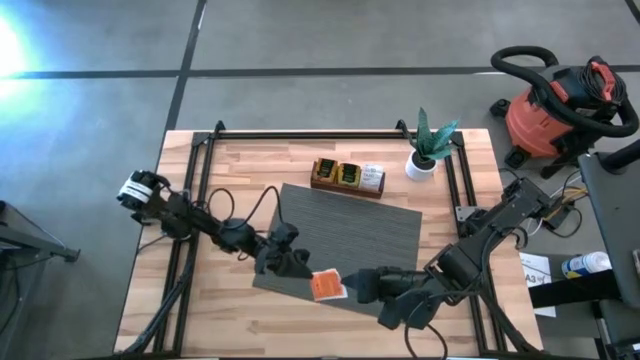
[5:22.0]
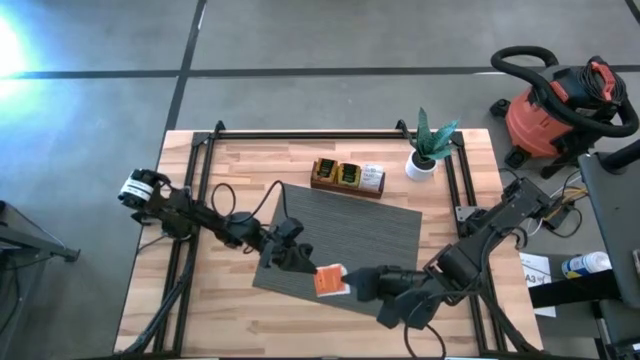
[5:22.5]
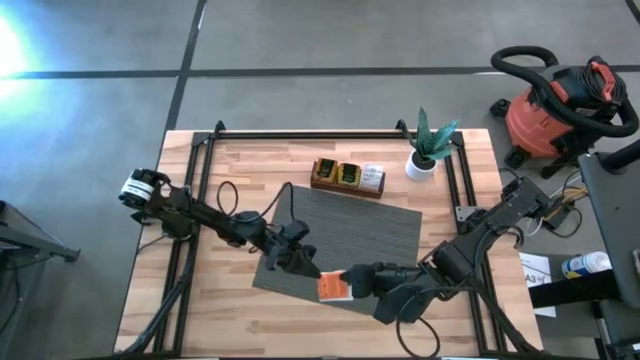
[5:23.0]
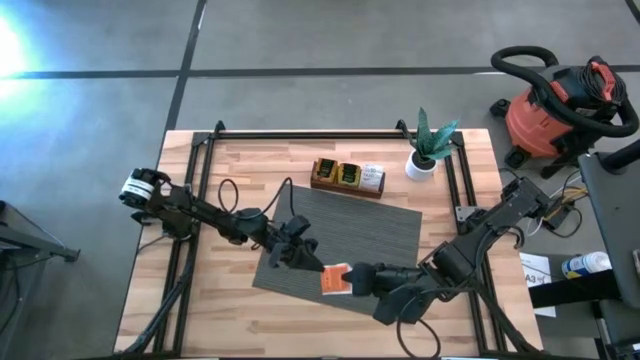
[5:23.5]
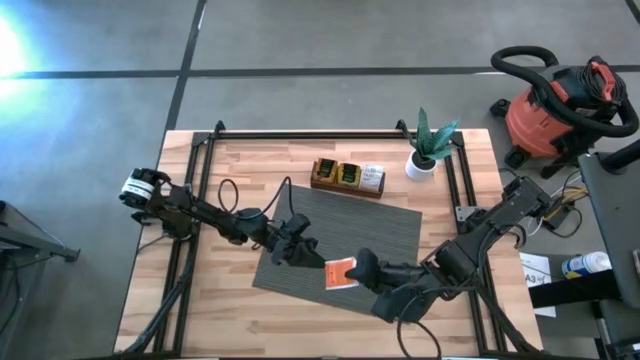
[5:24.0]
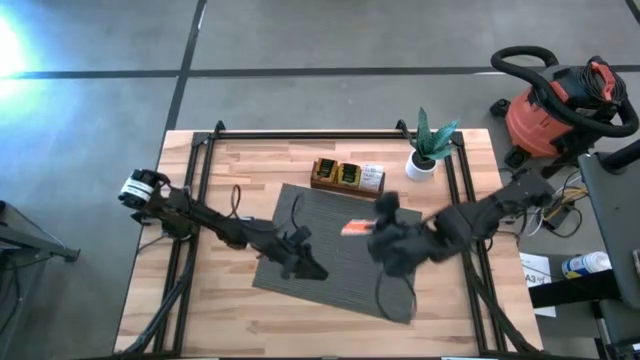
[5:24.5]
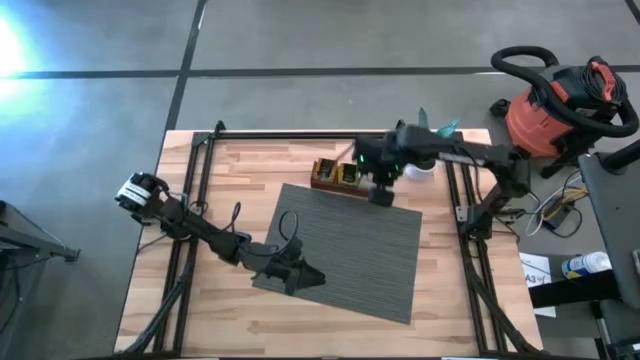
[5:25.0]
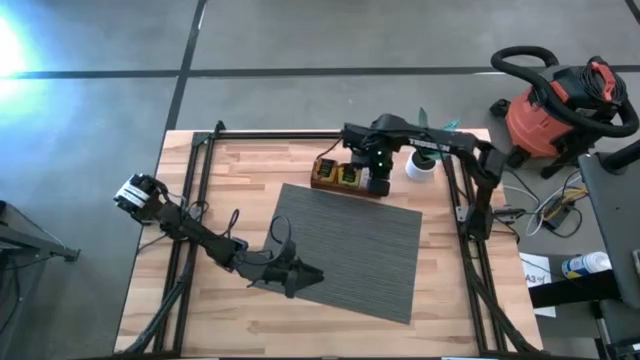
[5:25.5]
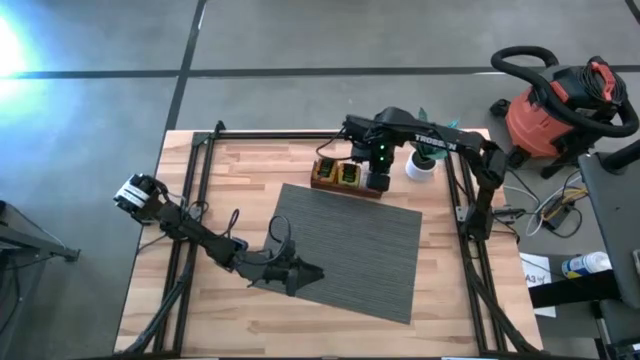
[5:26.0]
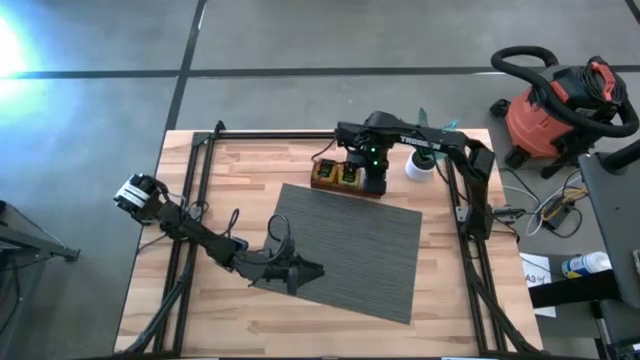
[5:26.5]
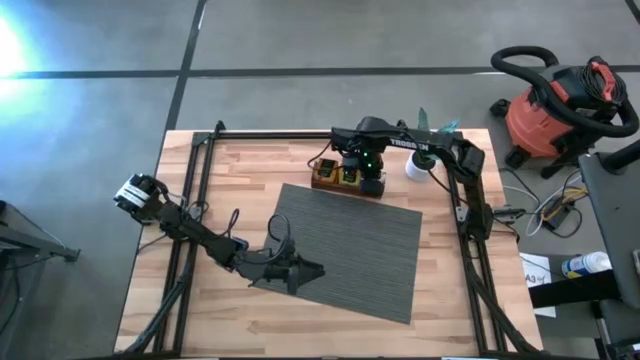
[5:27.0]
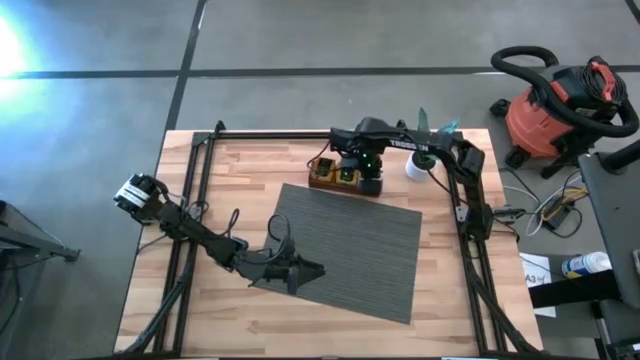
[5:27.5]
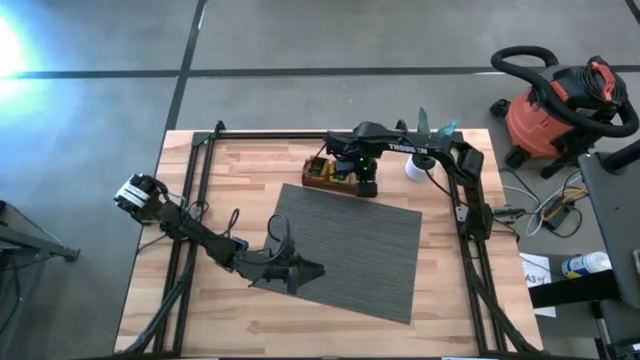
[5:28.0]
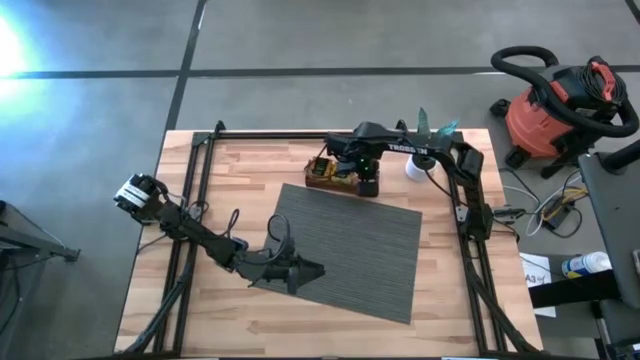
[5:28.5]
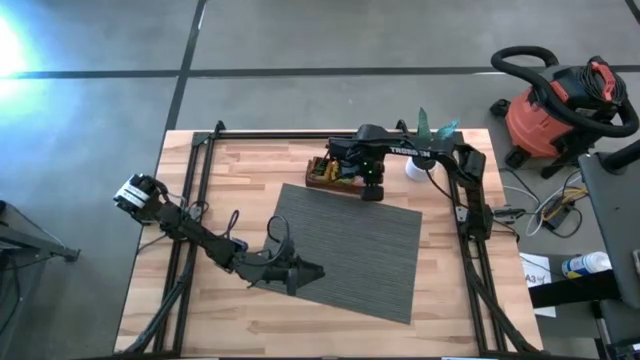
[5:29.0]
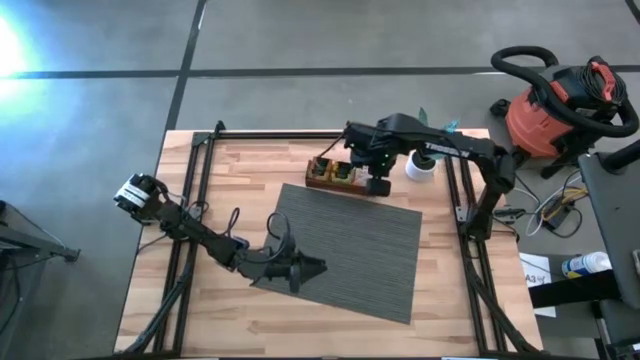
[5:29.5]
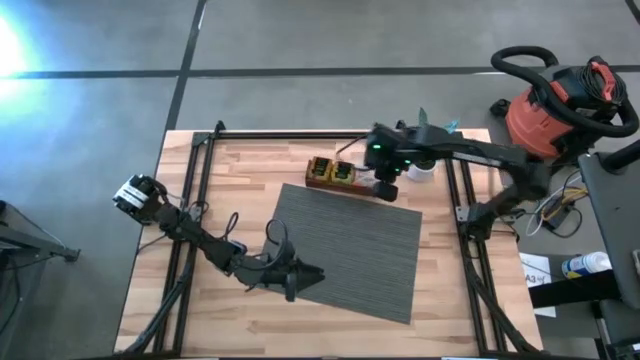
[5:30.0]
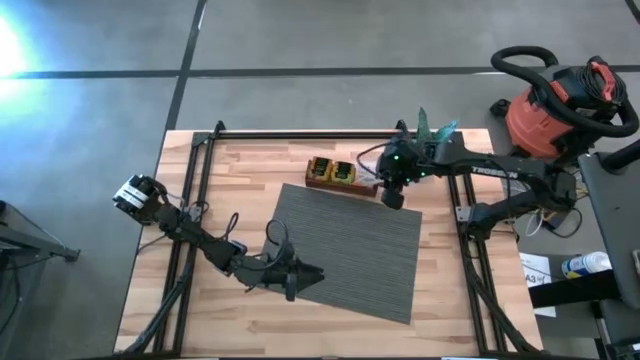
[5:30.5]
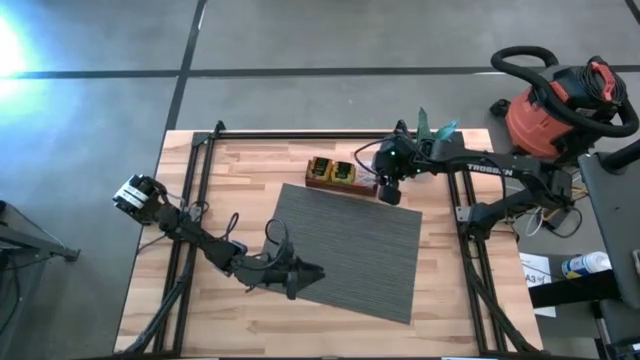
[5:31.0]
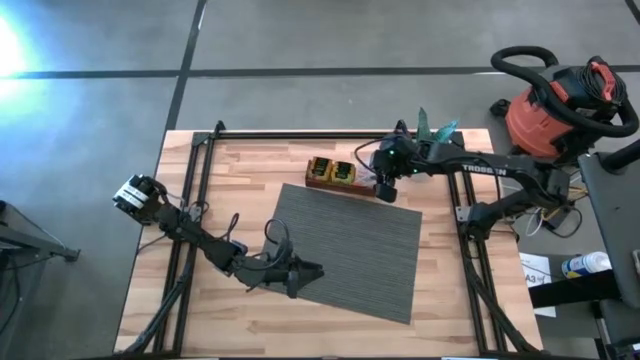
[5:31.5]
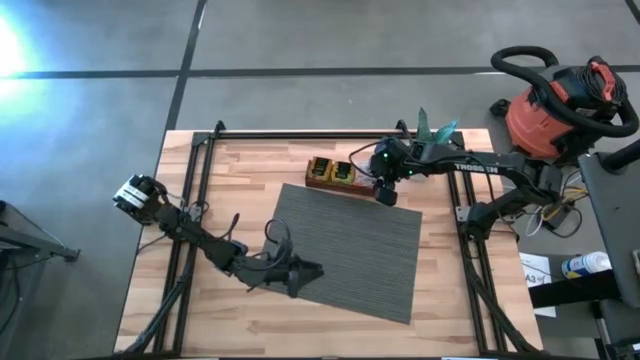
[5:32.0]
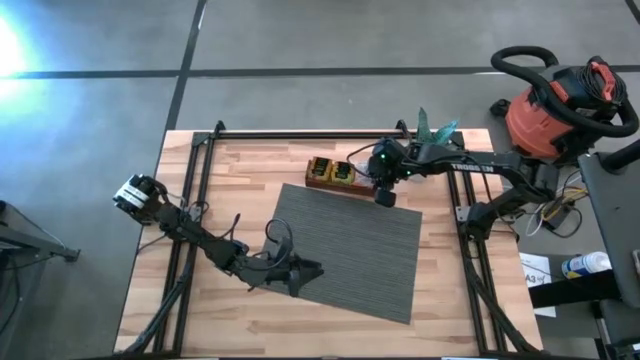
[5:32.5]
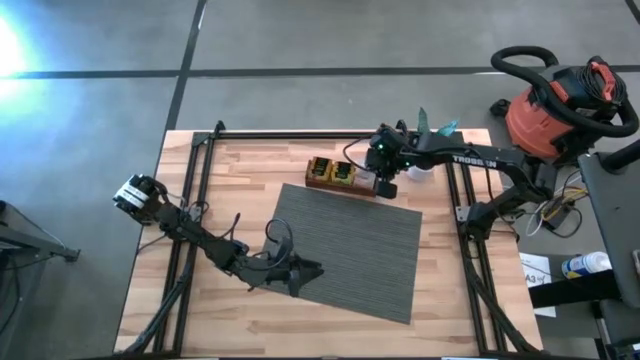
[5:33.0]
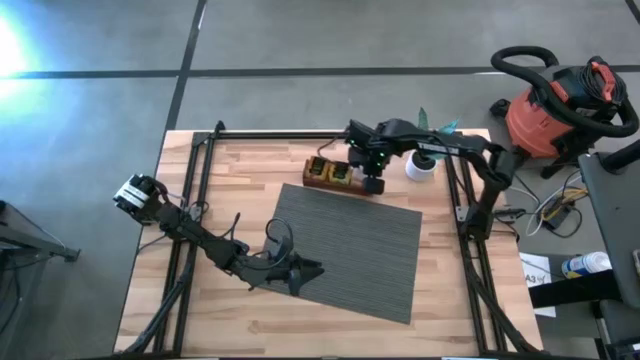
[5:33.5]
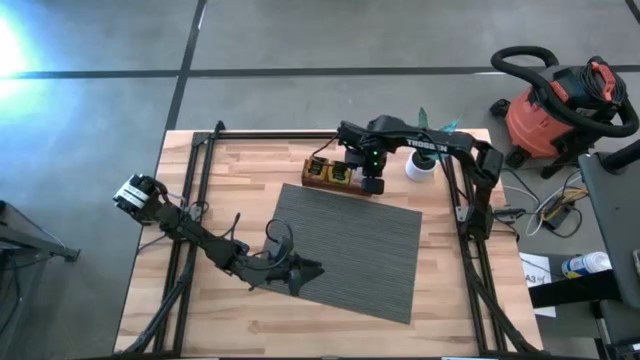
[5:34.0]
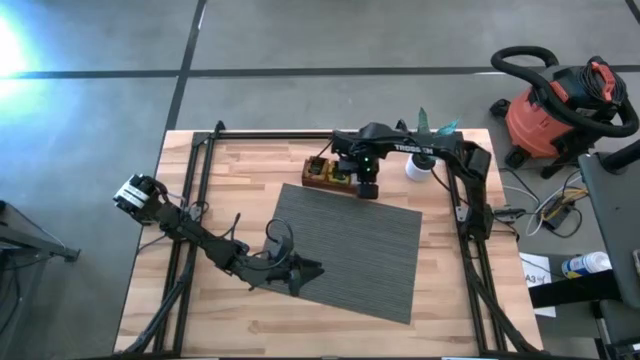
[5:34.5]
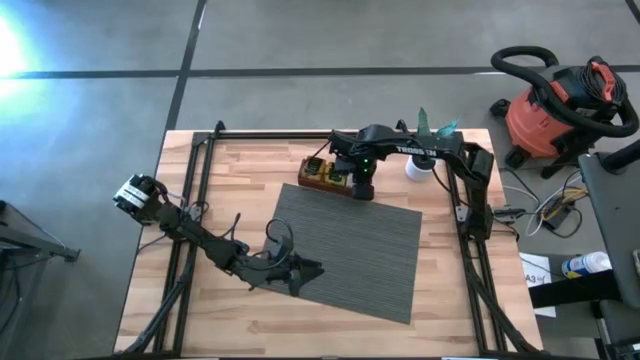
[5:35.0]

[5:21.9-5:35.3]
Task: Pick & Place Tea
Put the white orange tea bag into the right section of the wooden organizer

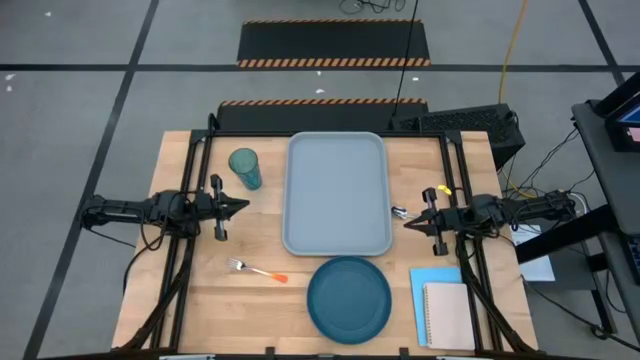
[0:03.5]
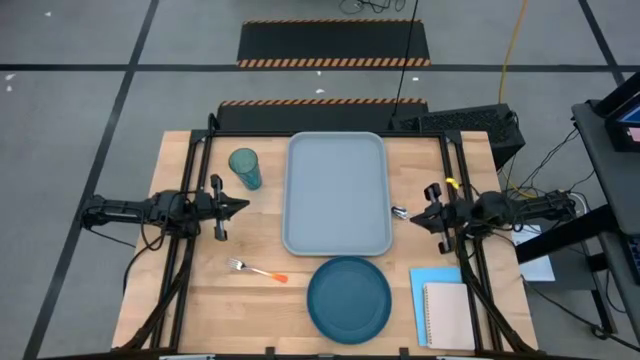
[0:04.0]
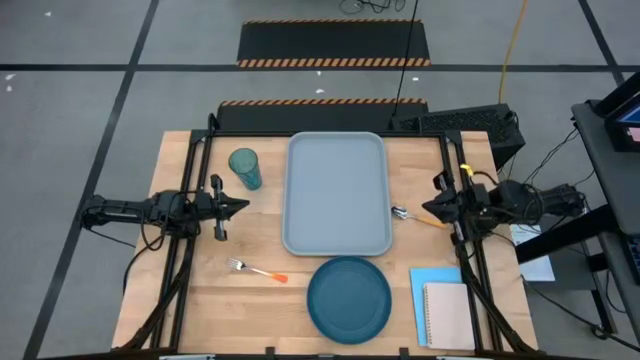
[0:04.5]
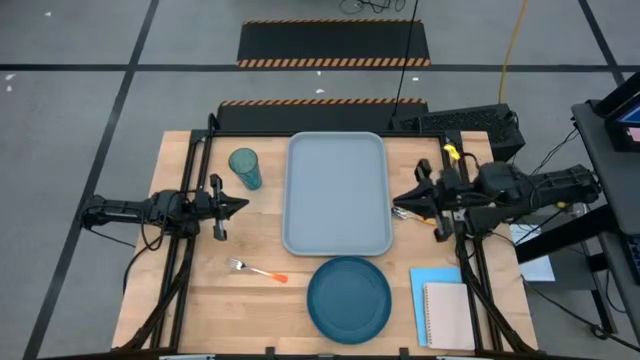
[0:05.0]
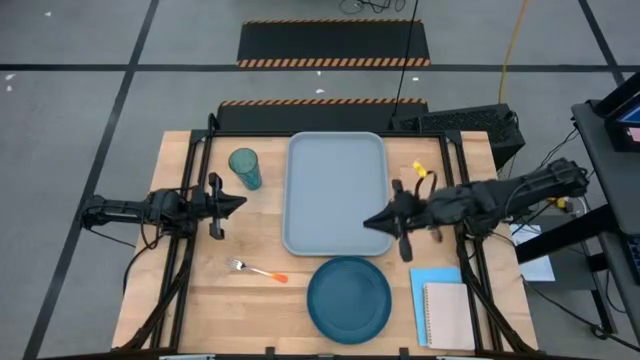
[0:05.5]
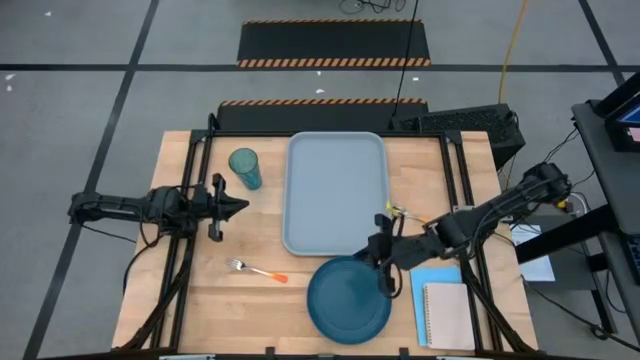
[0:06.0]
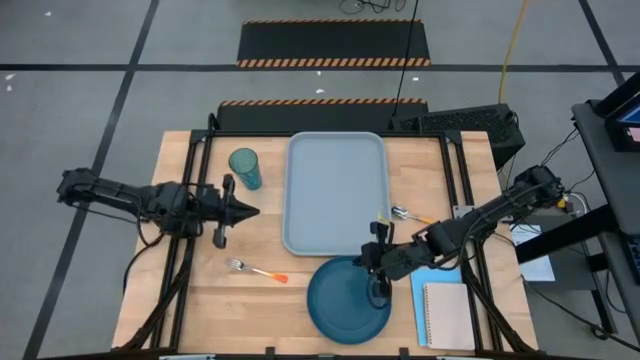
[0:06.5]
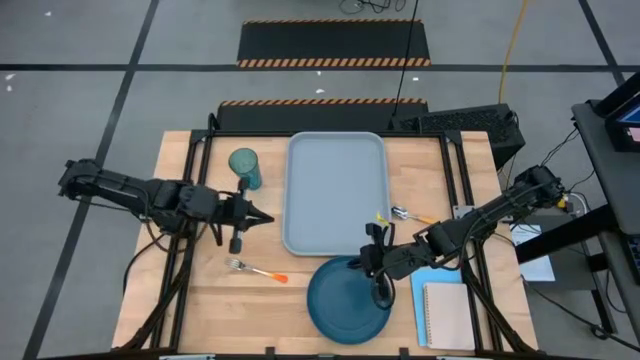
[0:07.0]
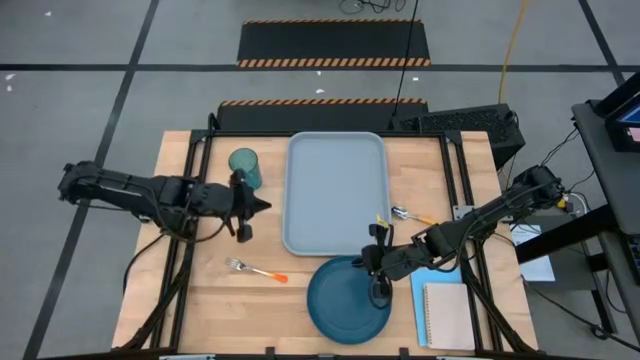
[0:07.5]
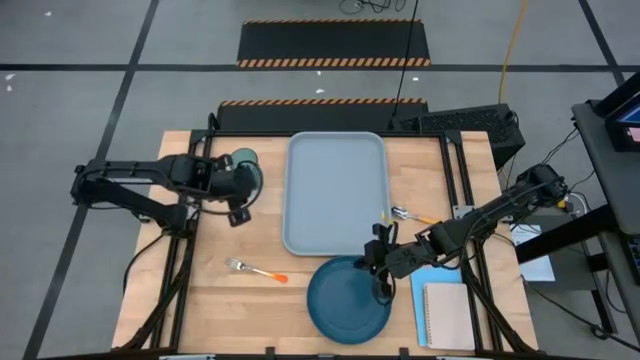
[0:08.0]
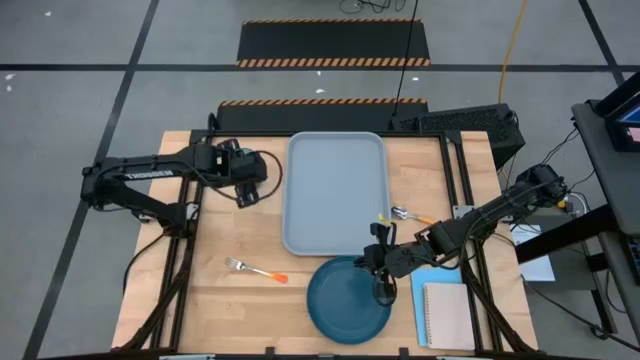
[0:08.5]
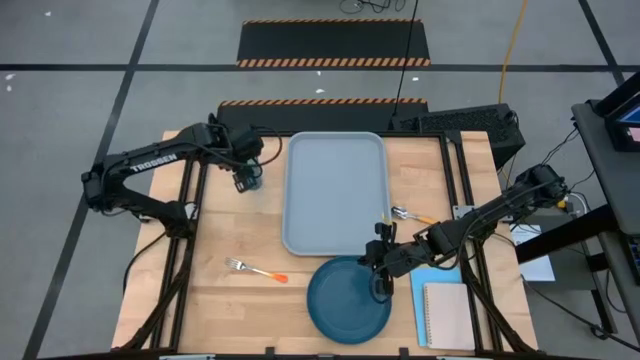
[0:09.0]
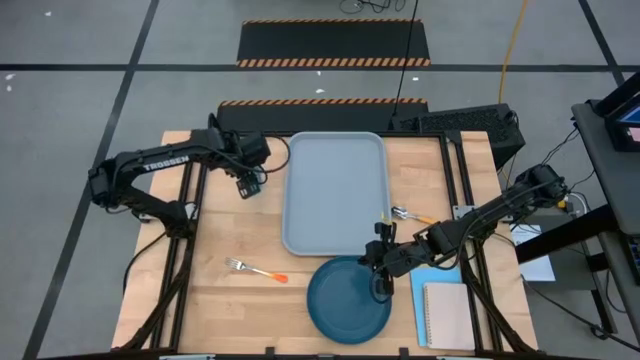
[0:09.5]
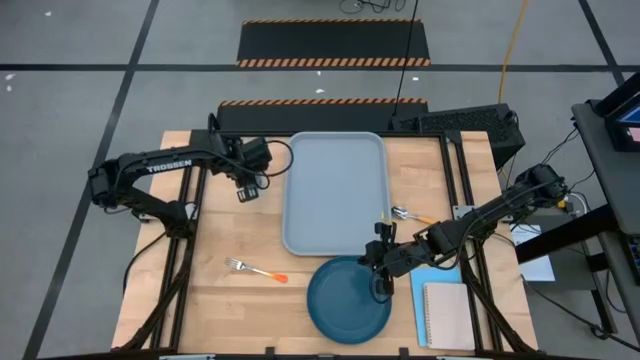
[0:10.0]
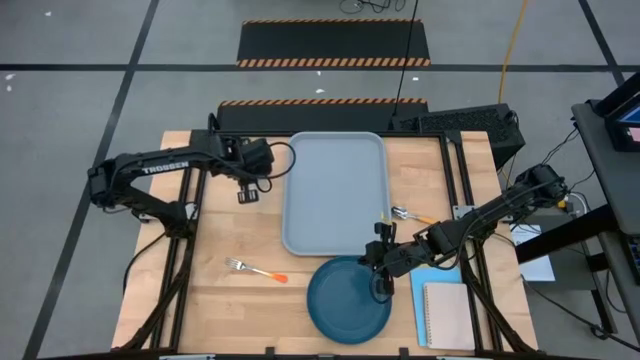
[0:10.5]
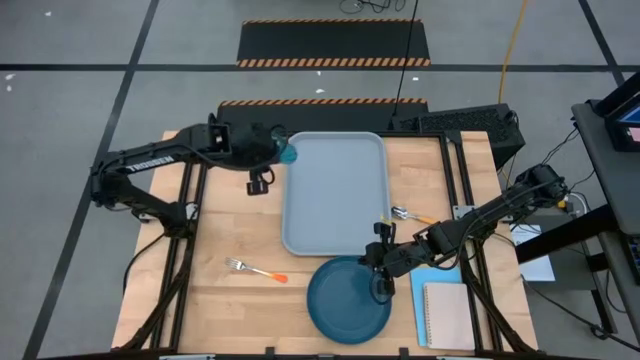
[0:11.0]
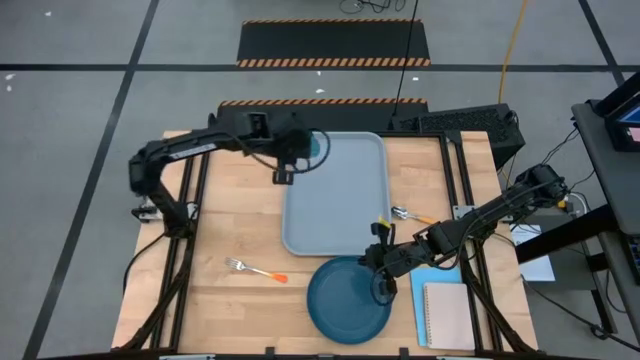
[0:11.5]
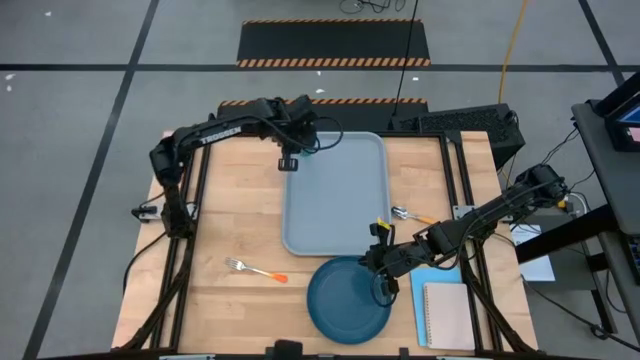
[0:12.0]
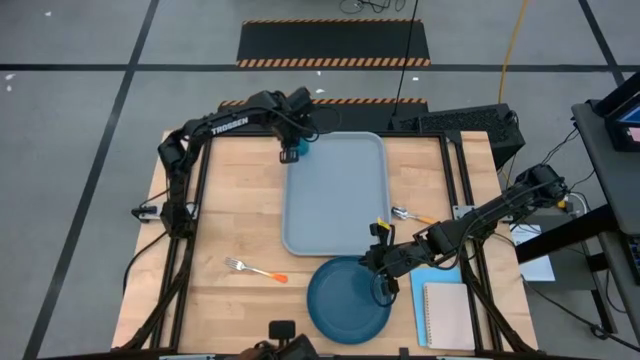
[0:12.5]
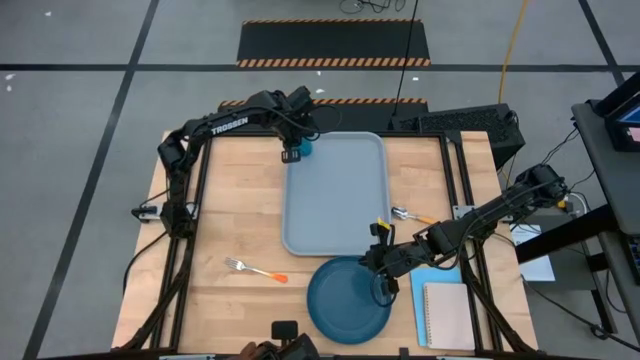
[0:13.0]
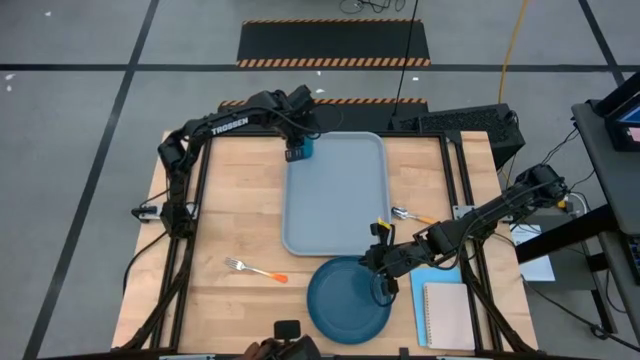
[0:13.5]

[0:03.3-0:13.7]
Task: Pick and place plate/cup/fork/spoon on tray
Put the blue glass on the gray serving tray
